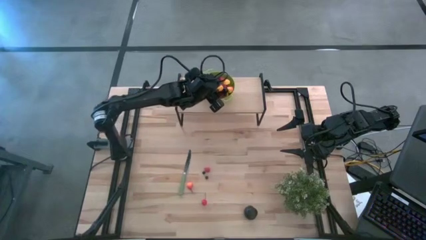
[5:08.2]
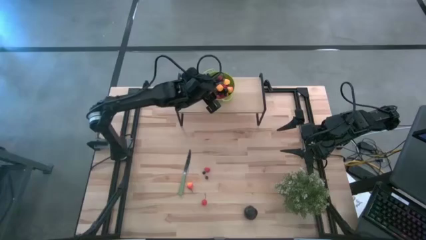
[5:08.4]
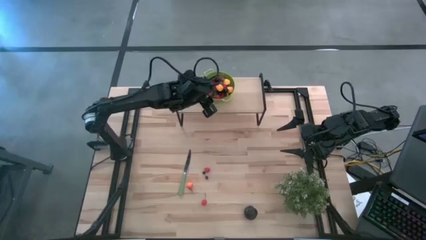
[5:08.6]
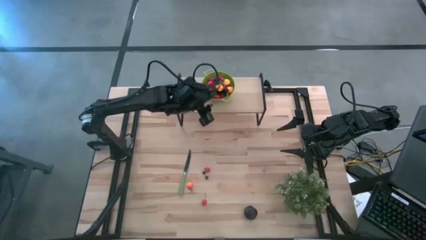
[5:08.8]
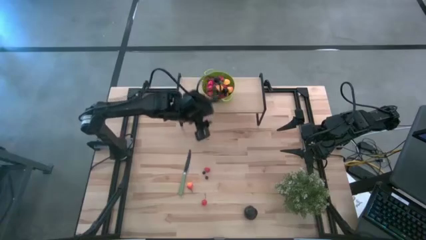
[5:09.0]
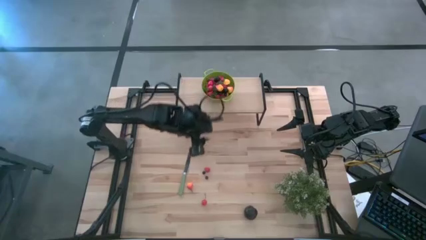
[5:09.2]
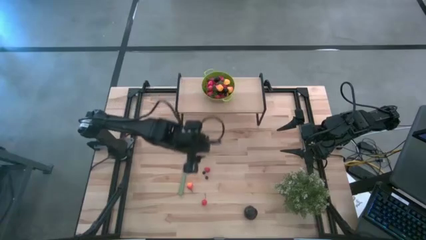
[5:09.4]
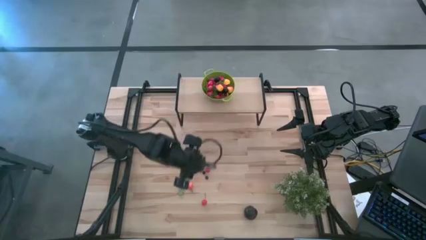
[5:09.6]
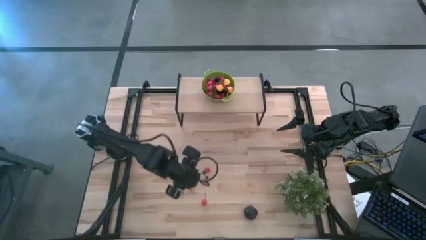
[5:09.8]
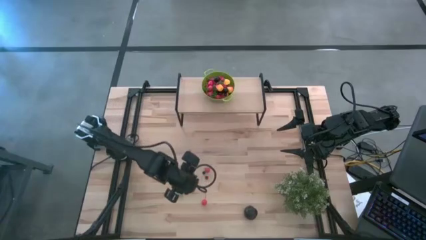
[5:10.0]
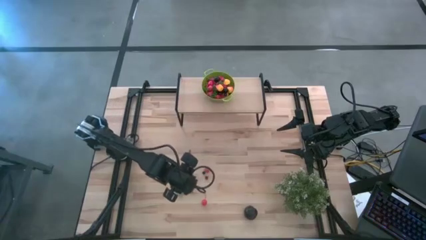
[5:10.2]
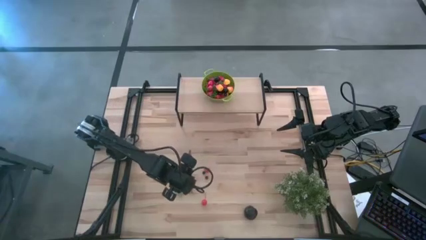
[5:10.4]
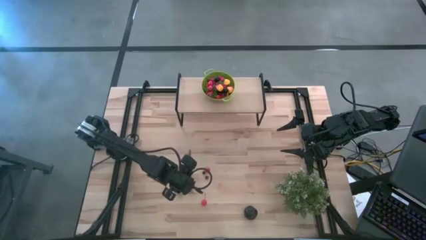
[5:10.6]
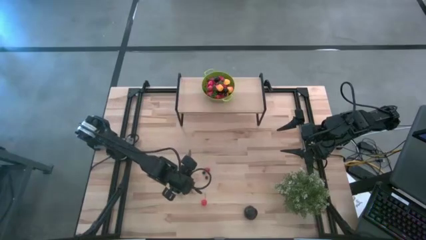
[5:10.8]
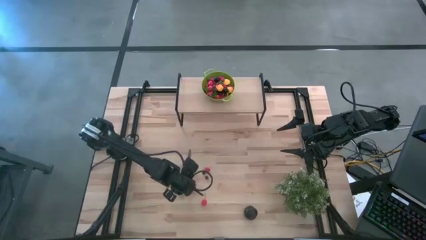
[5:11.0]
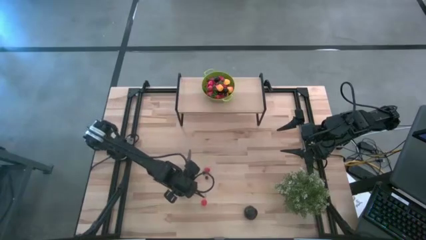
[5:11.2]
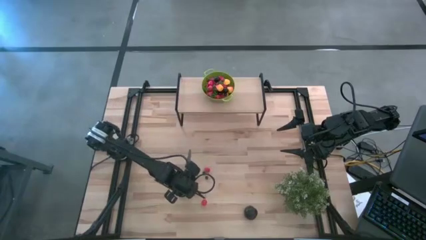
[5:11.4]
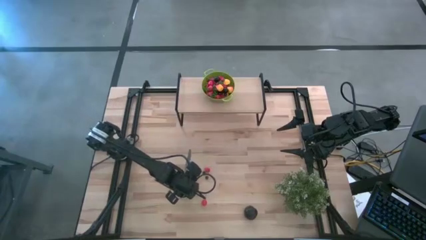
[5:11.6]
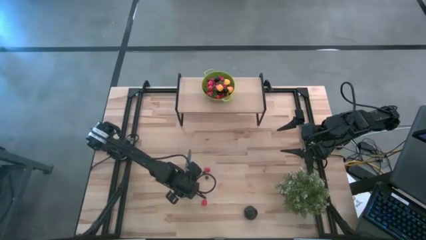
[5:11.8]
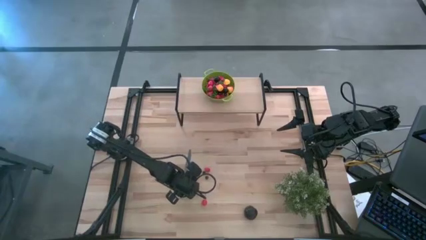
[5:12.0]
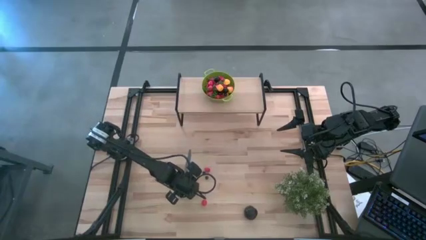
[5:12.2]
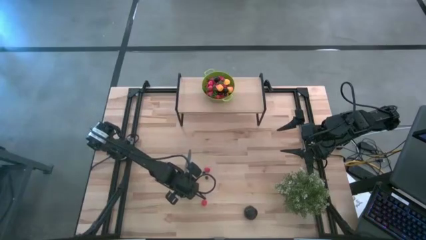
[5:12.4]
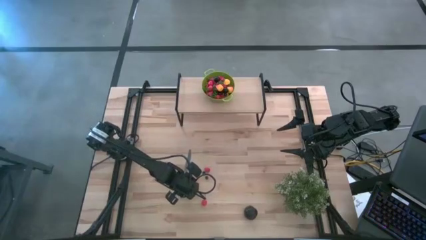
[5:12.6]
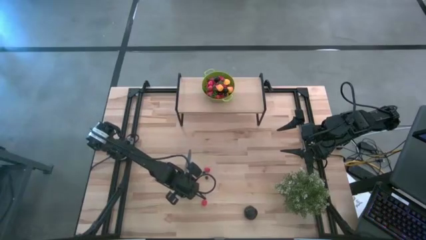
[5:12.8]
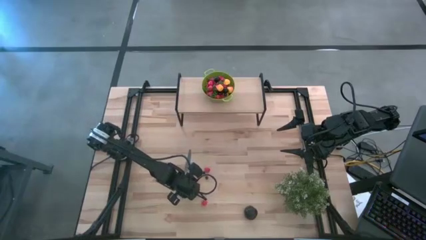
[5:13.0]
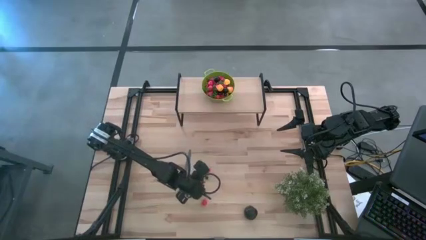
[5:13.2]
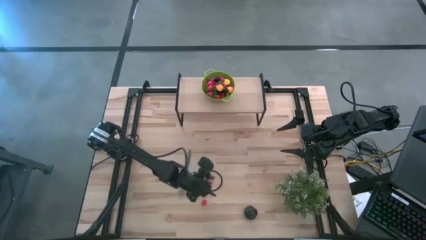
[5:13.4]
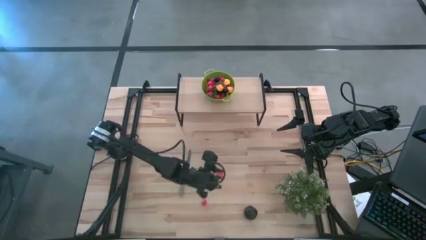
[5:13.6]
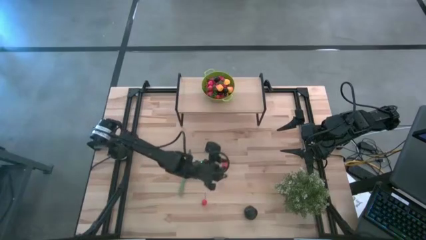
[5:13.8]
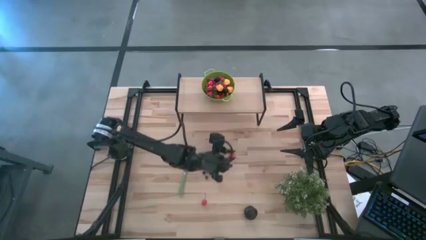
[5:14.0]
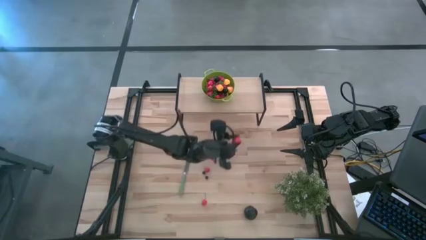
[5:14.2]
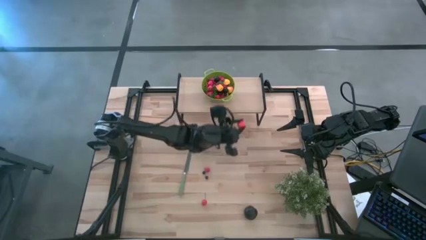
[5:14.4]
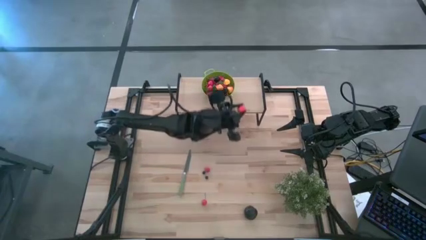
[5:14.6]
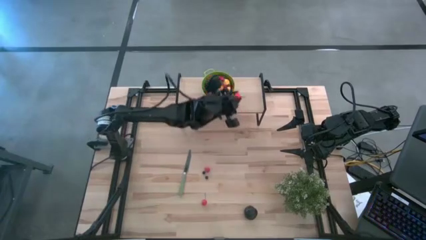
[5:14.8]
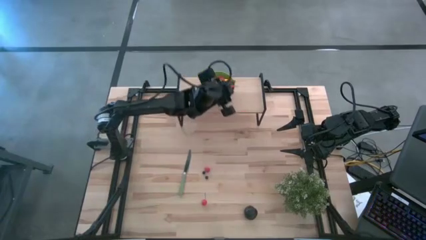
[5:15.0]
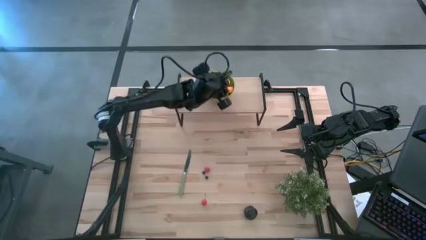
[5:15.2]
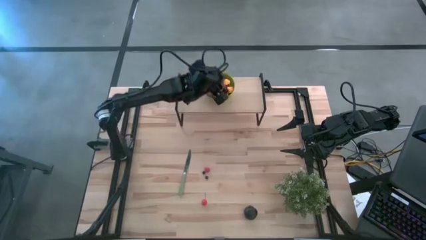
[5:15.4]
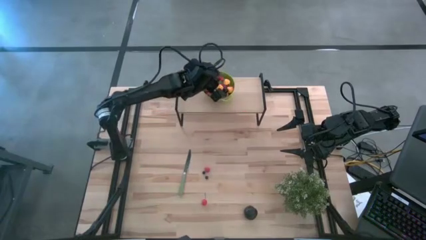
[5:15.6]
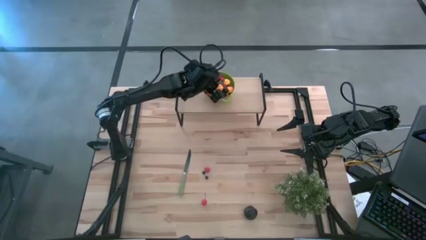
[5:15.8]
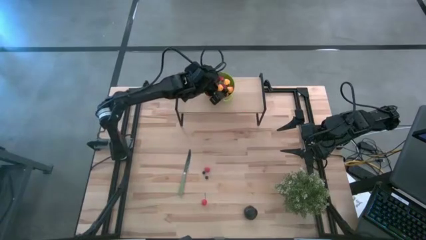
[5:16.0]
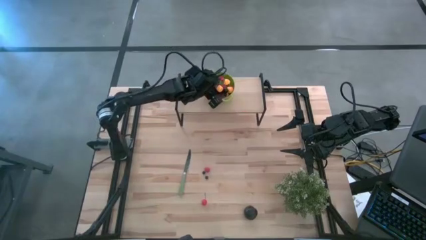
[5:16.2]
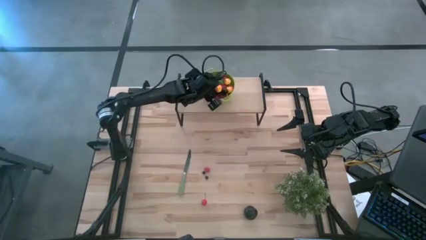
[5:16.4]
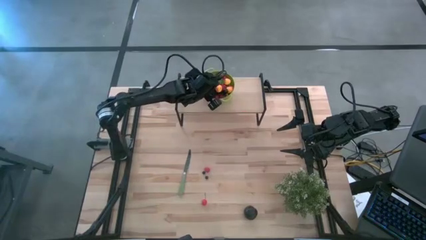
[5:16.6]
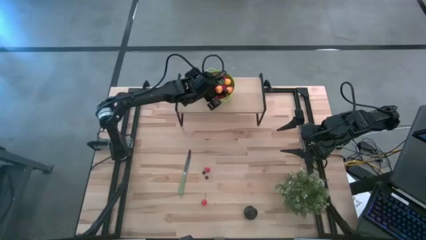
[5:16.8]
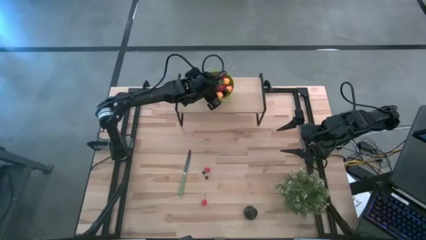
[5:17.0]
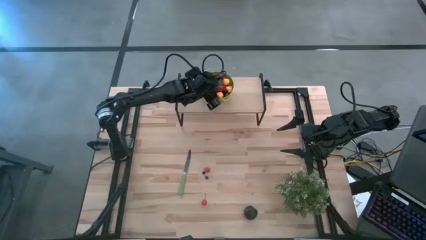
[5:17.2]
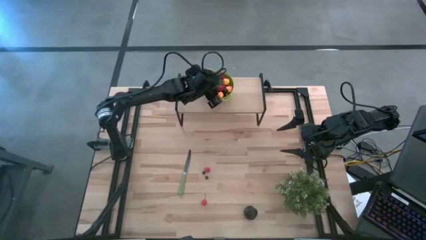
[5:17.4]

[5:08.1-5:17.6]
Task: Pick & Place Fruit
Put the pear into the green colander on the shelf

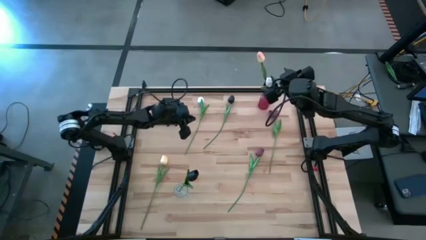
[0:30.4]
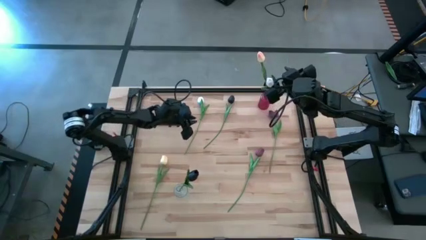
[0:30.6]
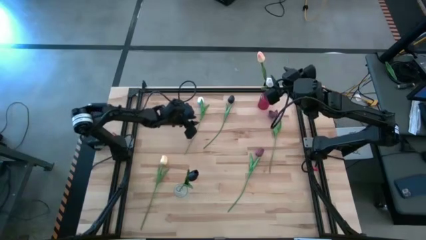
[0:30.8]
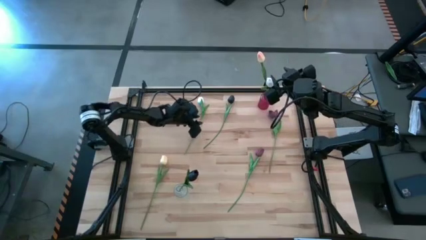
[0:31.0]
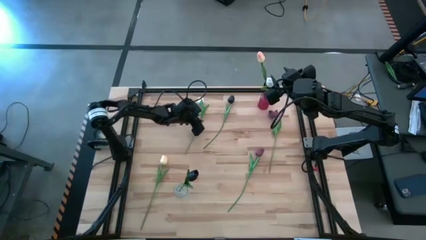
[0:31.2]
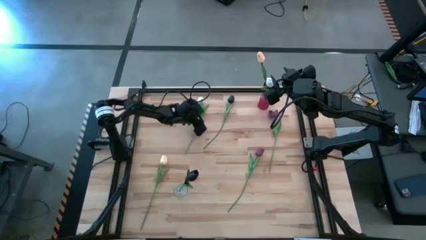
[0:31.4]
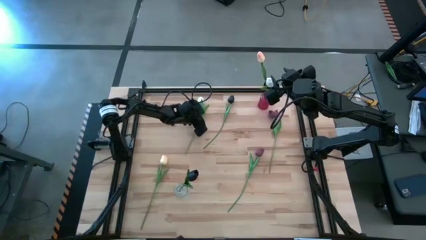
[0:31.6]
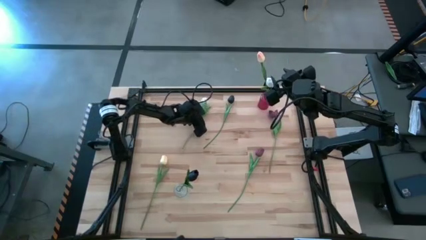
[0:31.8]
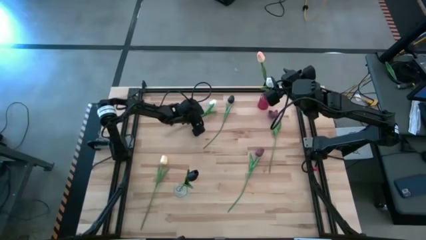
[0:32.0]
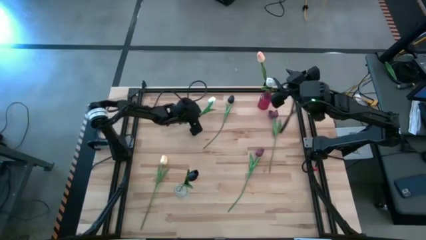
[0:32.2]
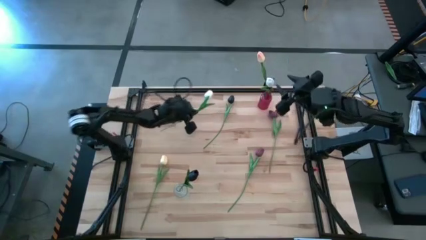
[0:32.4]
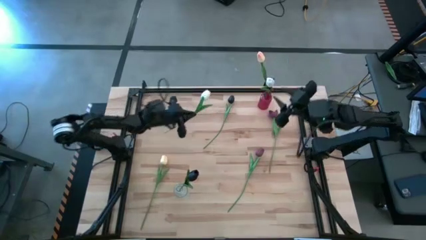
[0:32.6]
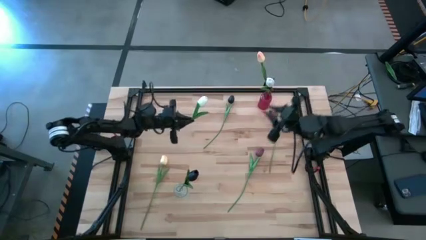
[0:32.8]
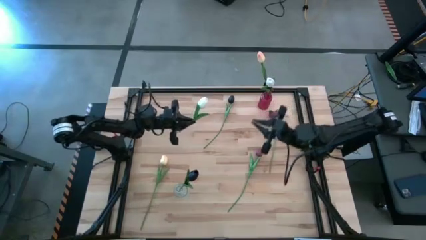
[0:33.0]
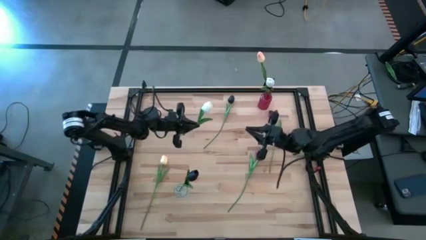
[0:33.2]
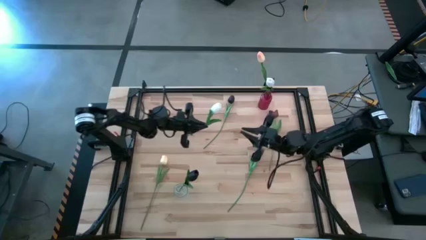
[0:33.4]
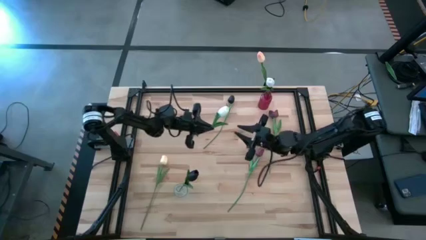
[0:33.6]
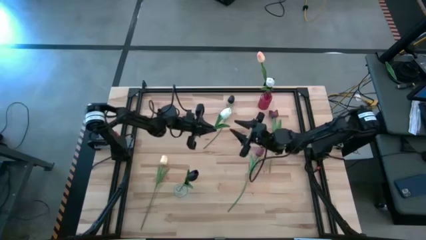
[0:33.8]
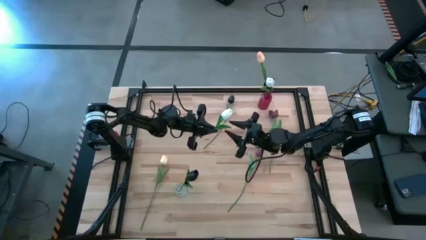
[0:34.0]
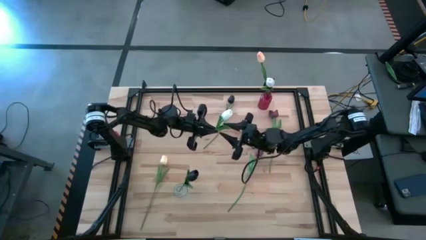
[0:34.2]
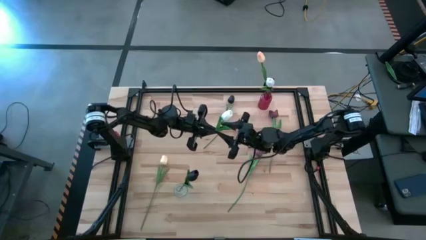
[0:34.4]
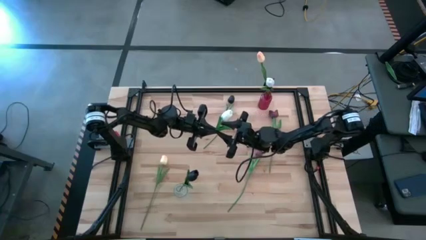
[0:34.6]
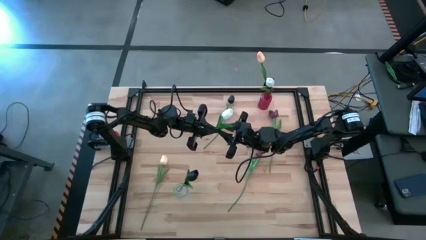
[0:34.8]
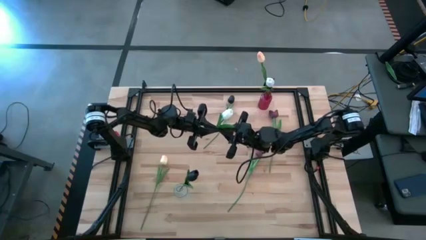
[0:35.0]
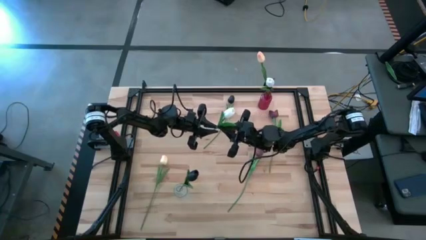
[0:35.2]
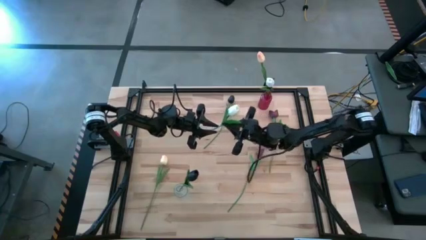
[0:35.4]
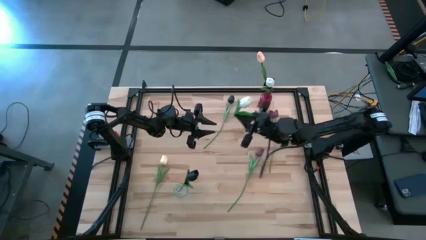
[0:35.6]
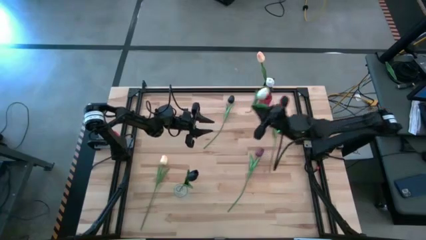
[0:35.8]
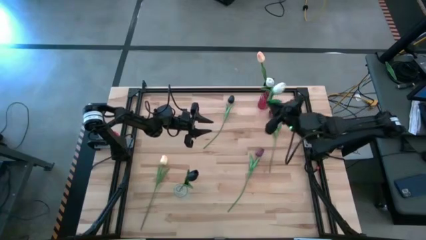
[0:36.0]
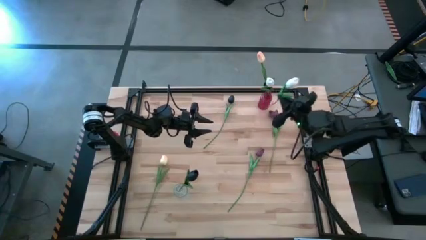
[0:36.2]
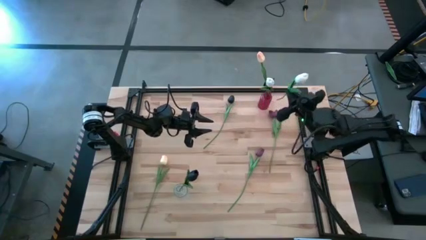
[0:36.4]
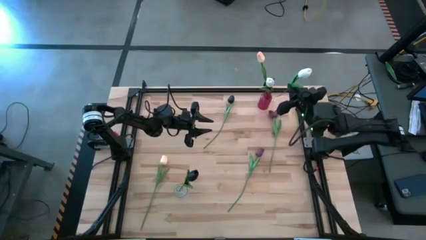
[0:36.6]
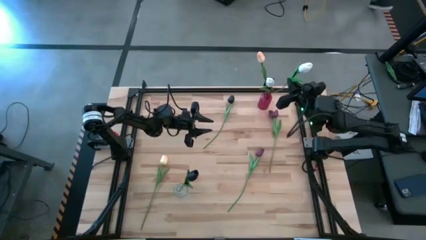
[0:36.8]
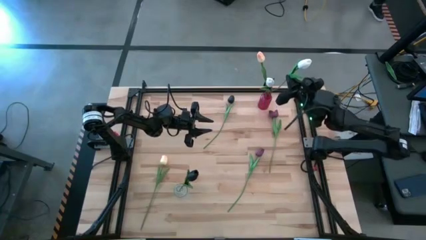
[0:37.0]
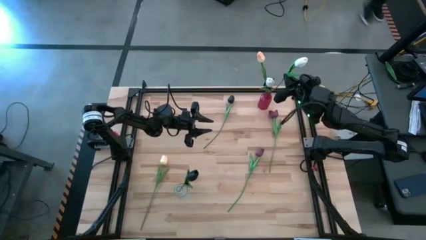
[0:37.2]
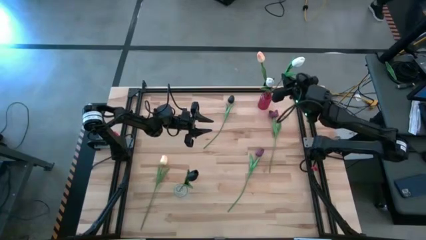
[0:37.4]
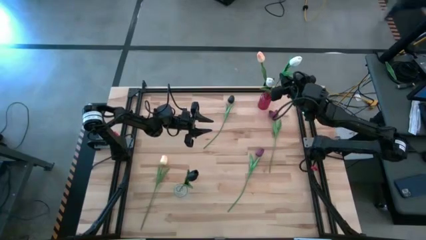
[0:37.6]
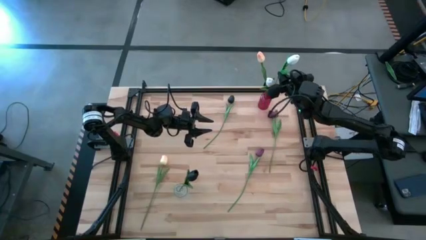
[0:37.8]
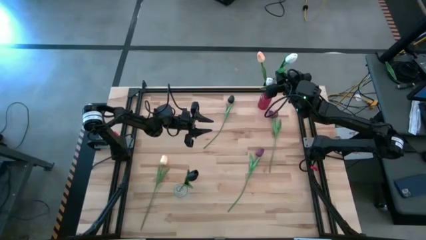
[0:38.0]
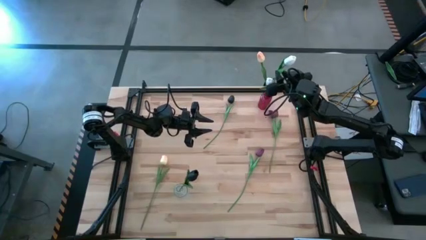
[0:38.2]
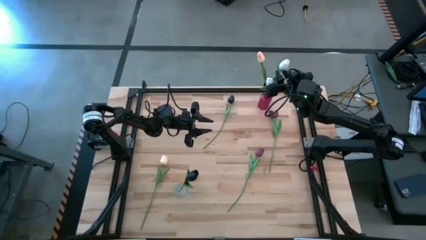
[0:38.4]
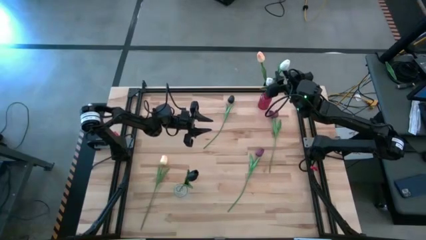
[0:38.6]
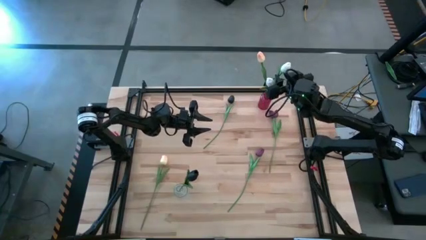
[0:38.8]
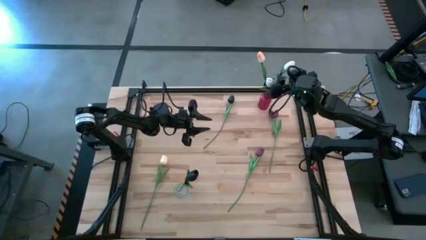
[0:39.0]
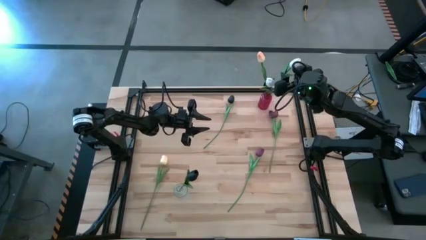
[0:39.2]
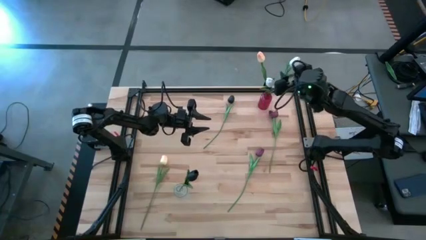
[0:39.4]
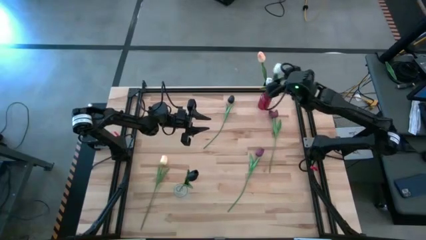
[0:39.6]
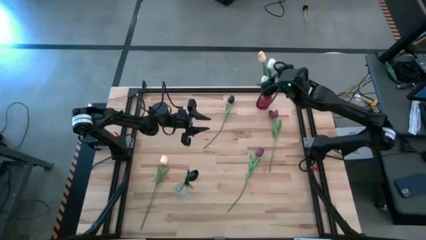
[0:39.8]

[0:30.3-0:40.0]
Task: Sort flowers into vase by color
Put the white flower into the red vase
